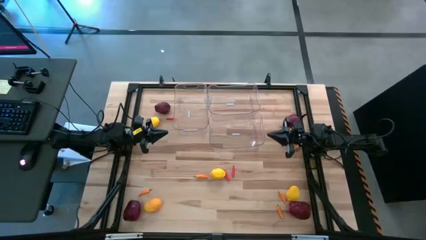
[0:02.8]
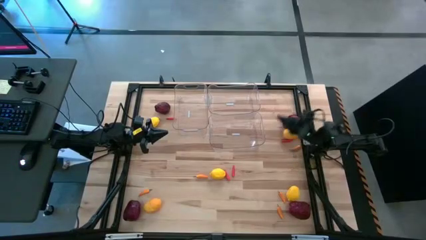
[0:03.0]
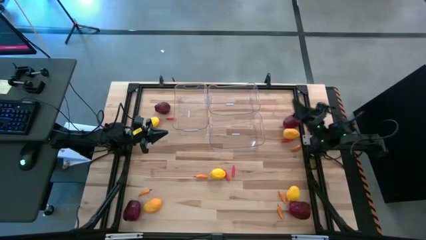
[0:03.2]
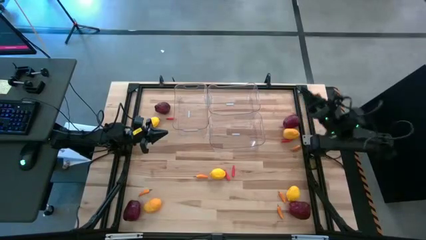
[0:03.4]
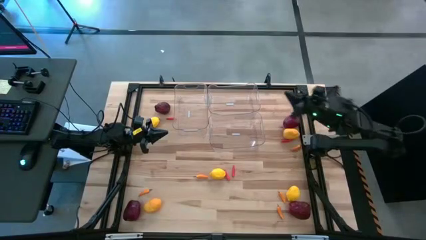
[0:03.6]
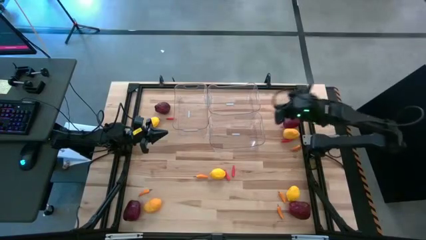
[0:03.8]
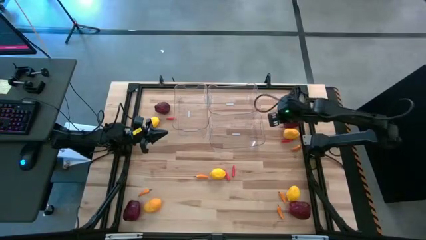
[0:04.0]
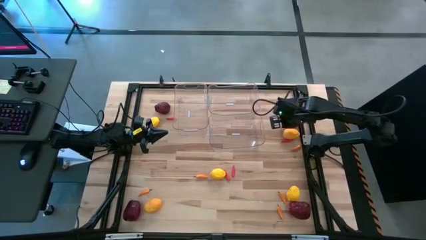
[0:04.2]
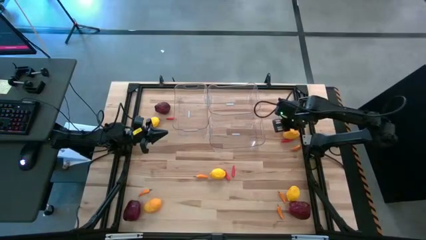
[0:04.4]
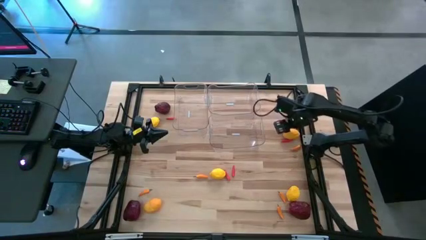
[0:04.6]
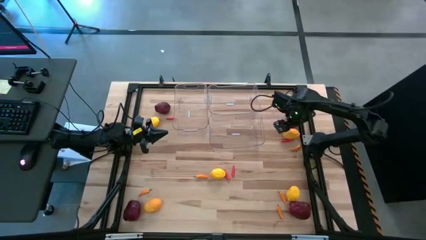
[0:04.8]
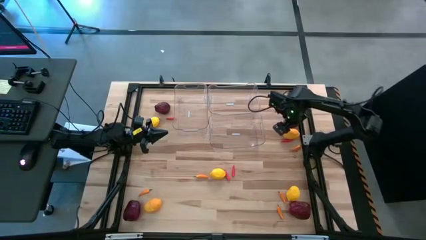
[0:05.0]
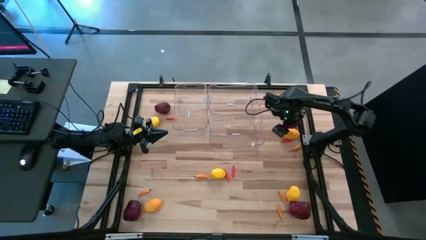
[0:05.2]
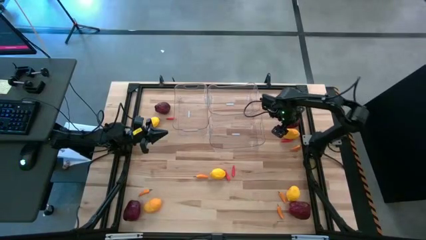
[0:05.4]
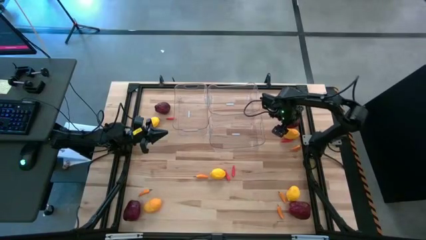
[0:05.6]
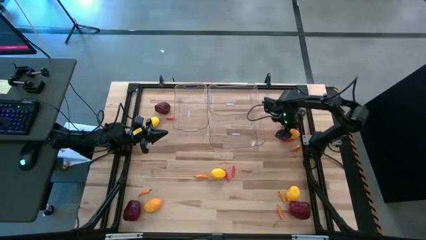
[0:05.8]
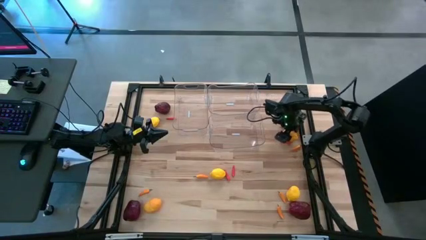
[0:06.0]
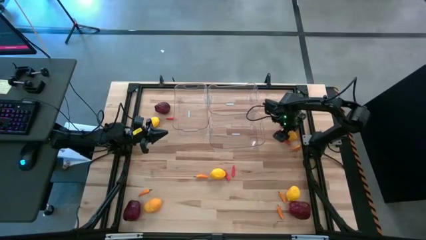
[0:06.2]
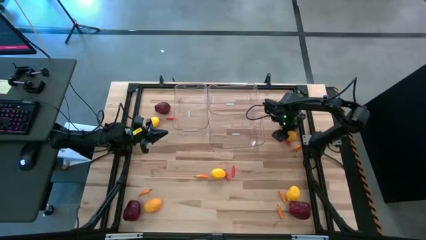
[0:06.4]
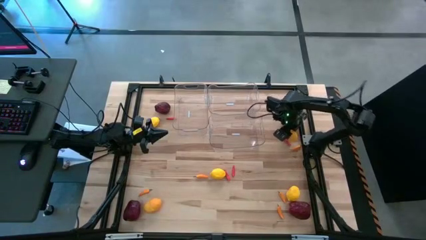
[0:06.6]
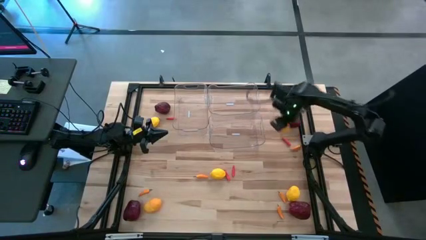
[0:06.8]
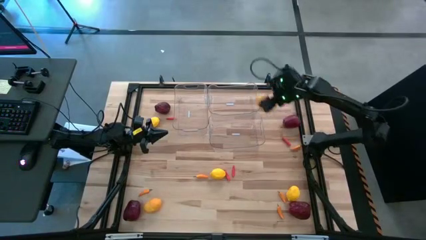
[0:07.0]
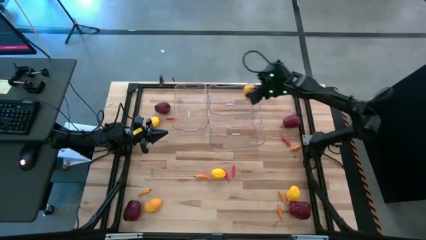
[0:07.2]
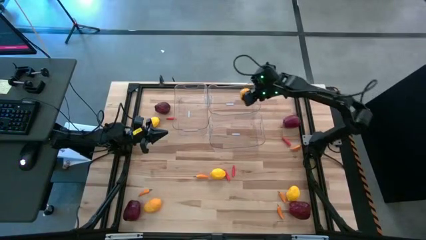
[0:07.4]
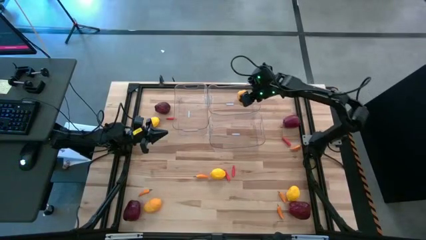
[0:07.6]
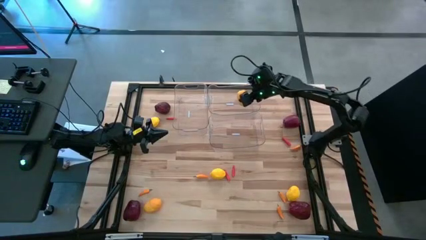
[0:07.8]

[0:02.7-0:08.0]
Task: Sort produce into baskets
Put the lemon into the top right transparent bin

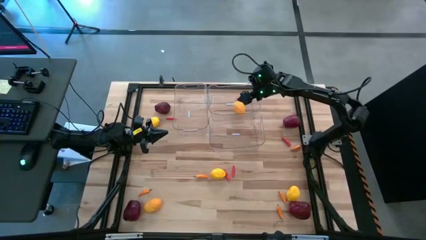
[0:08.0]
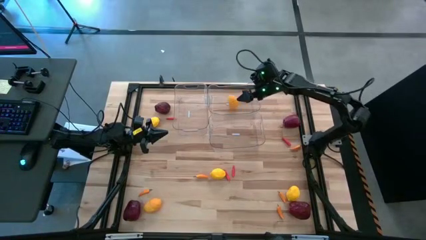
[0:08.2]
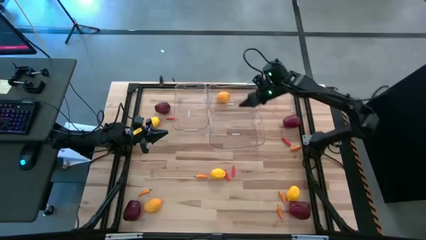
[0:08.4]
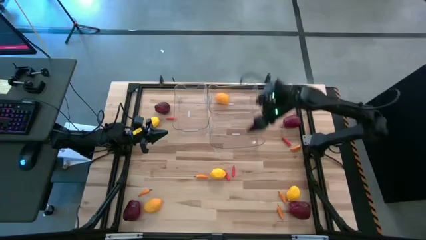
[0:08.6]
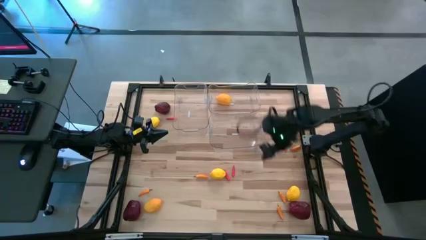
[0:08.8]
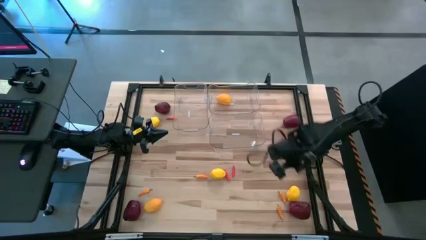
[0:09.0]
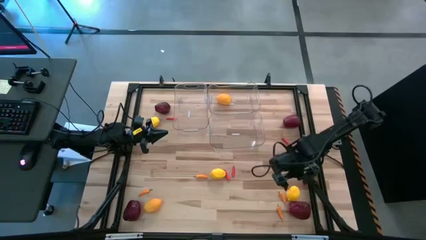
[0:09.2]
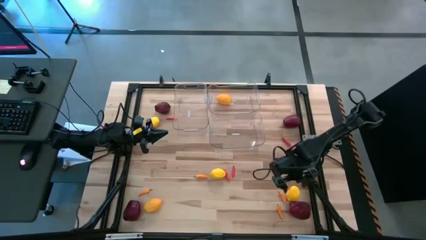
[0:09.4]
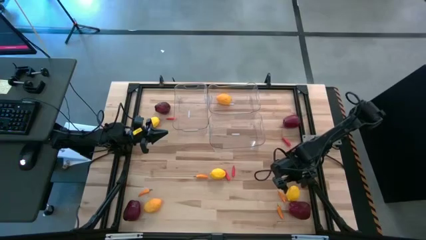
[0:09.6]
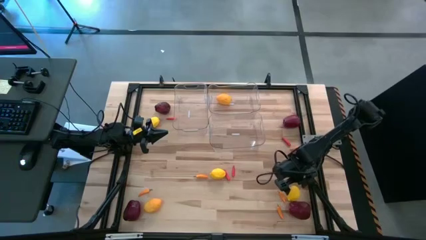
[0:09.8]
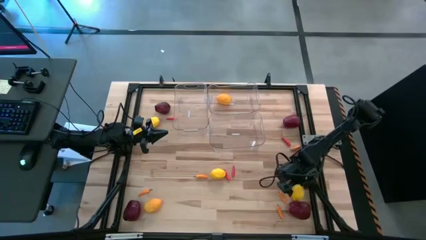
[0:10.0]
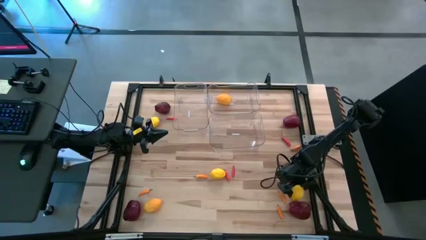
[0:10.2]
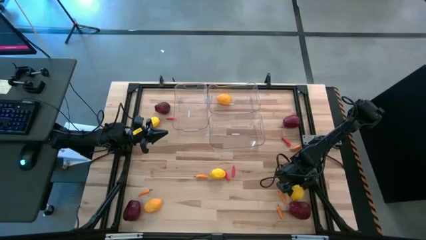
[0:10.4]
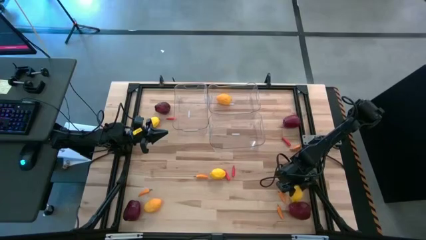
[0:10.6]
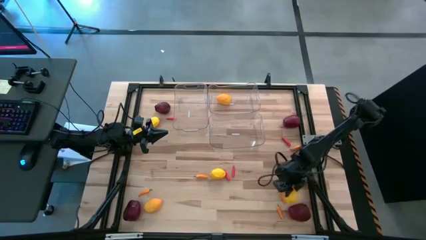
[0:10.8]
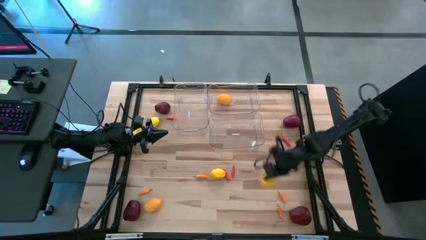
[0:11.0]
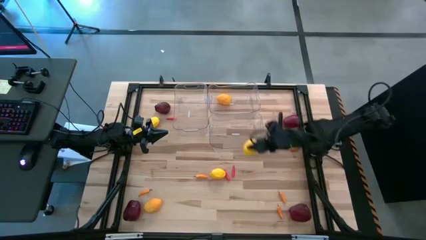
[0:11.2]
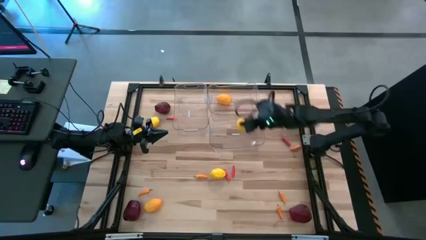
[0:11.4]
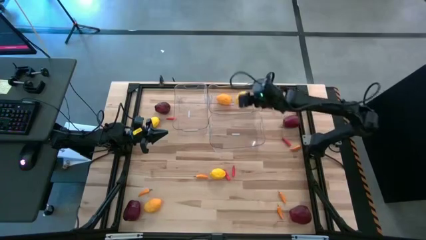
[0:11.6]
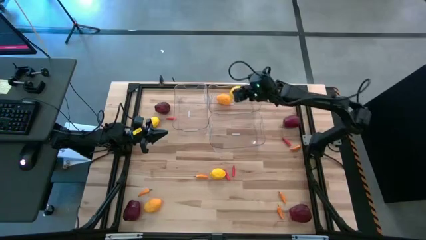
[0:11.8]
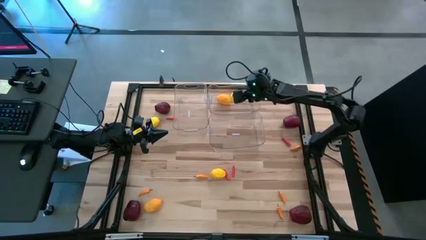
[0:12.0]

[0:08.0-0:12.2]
Put the lemon into the top right transparent bin

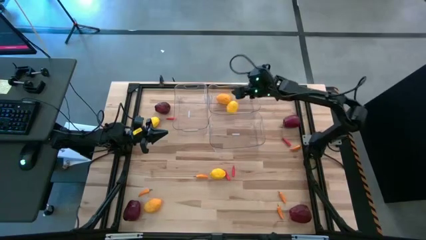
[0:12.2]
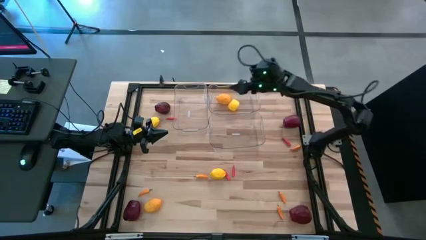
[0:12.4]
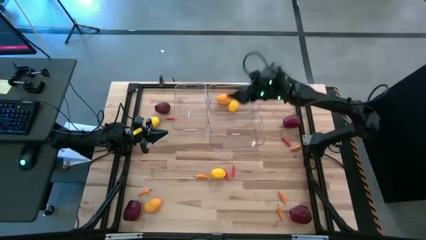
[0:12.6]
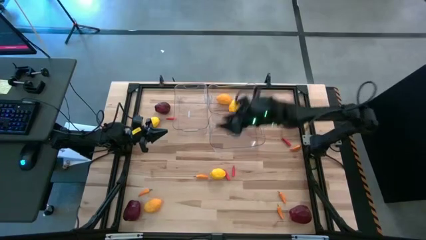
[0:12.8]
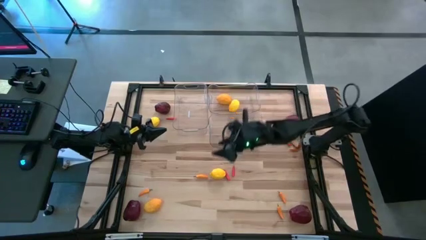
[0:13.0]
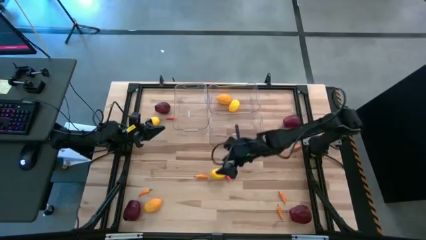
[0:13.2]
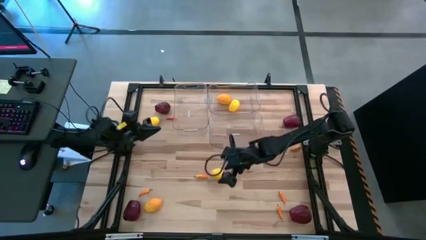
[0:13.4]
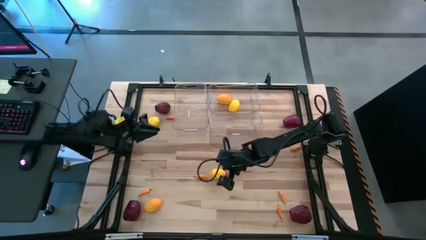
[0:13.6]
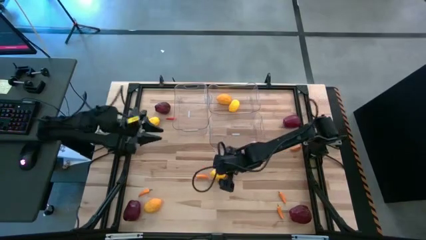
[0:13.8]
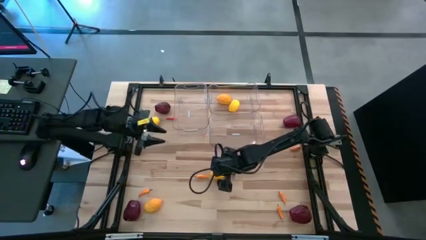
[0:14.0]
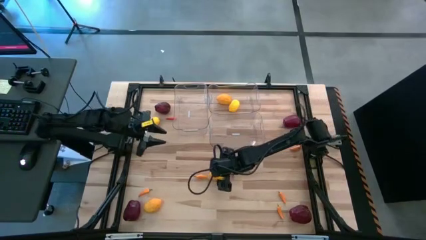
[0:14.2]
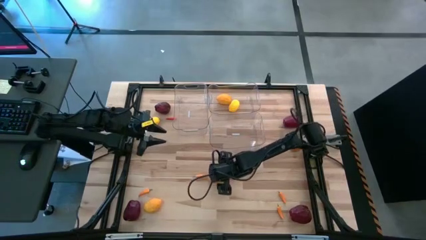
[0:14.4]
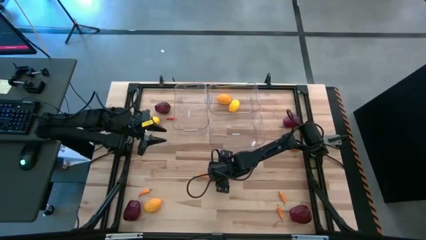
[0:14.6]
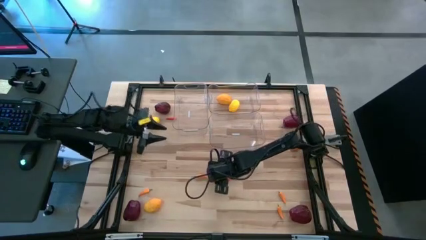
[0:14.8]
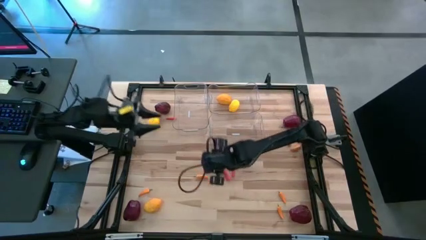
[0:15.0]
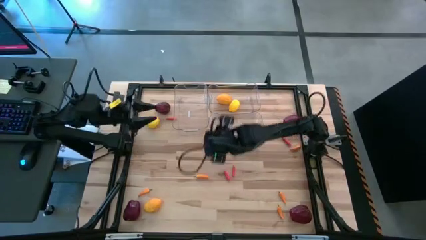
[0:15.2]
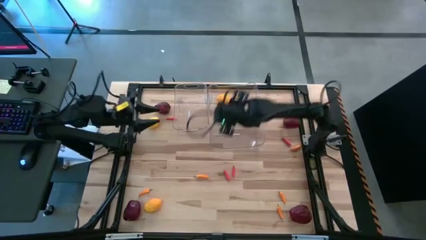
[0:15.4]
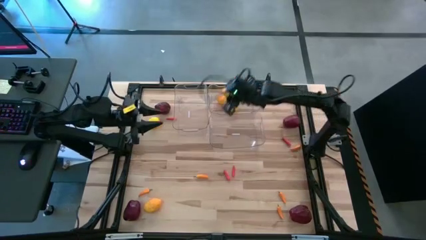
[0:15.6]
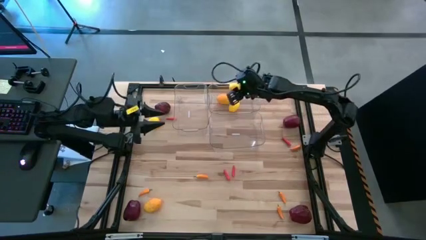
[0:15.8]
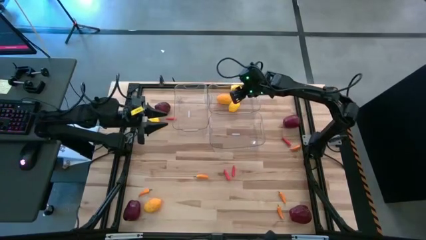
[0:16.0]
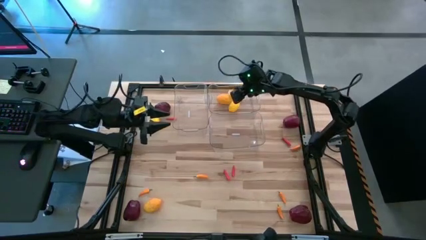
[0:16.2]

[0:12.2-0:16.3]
Put the lemon into the top right transparent bin

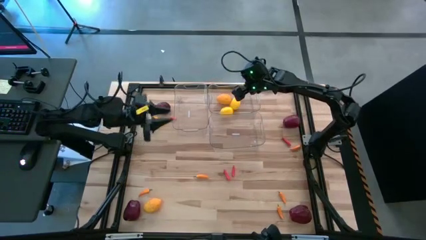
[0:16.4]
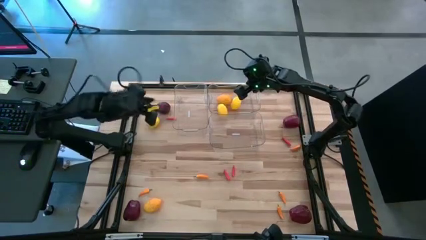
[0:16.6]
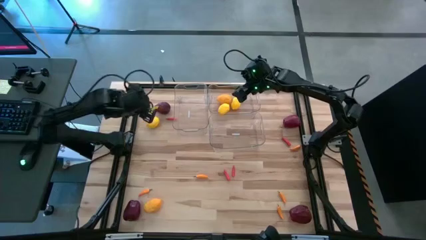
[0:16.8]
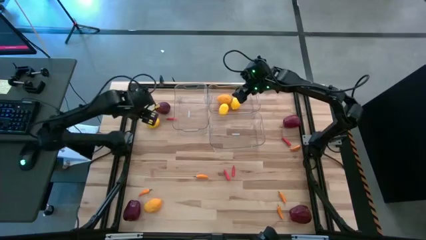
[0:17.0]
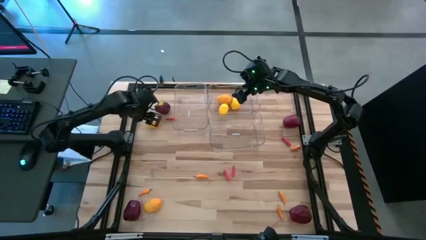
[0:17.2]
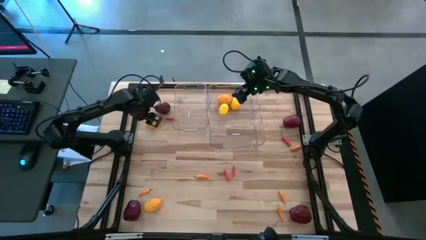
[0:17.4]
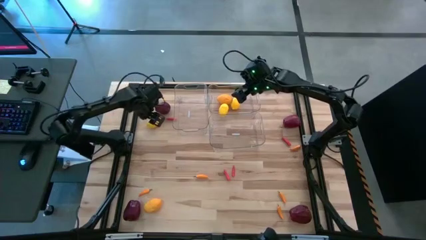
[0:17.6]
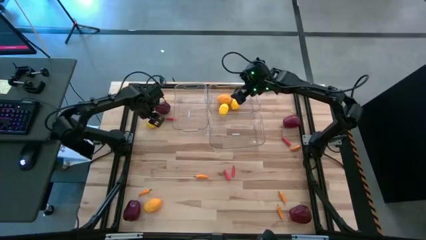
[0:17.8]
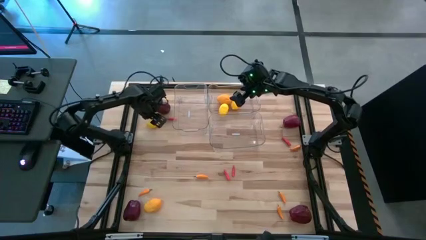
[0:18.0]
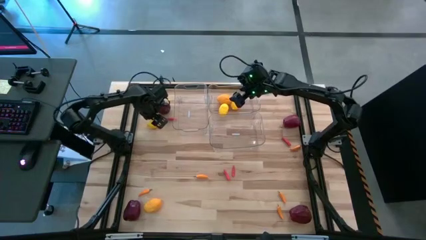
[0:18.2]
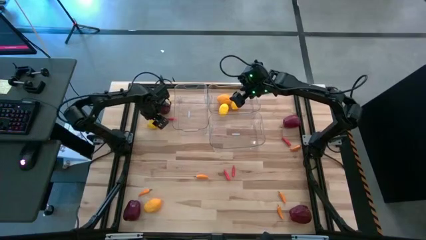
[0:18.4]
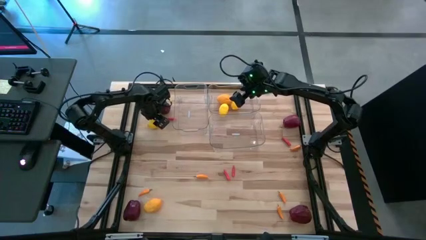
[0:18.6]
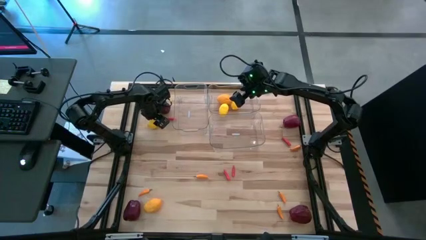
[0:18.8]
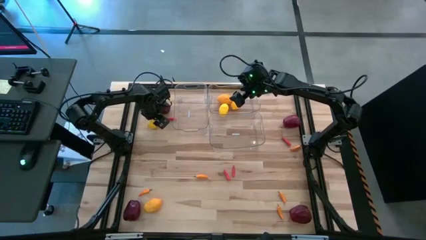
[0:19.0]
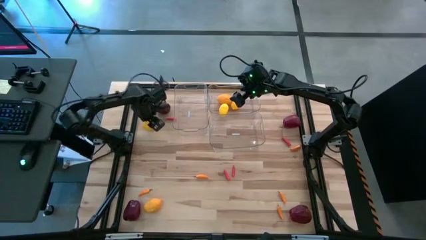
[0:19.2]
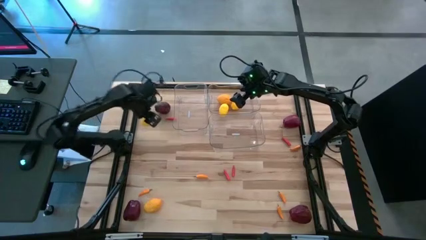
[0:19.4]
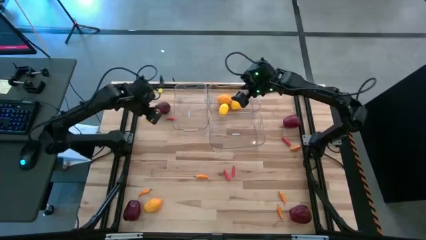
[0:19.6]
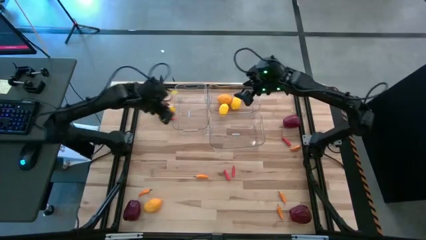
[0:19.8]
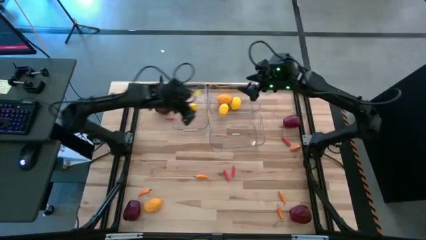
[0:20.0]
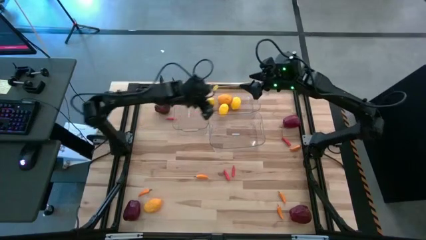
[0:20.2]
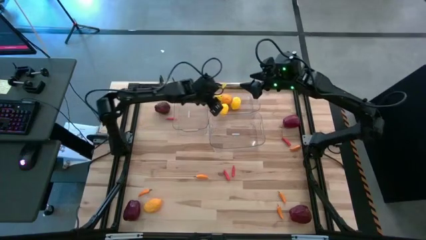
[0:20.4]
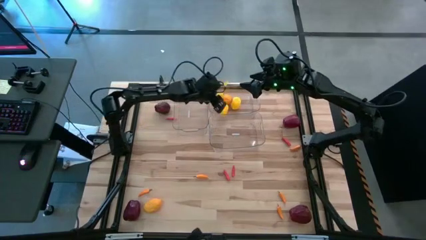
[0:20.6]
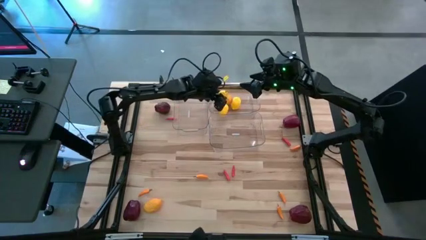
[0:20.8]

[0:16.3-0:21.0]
Put the lemon into the top right transparent bin
